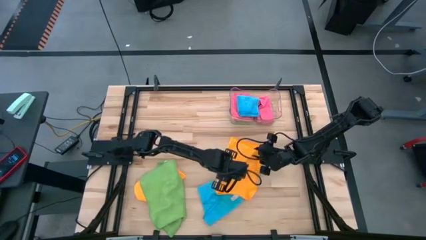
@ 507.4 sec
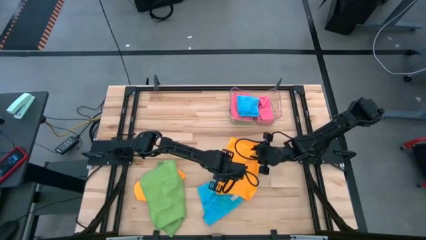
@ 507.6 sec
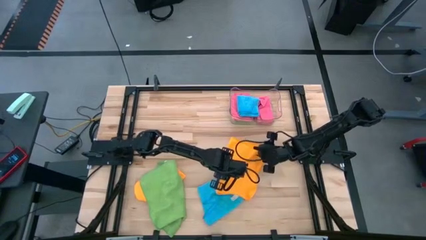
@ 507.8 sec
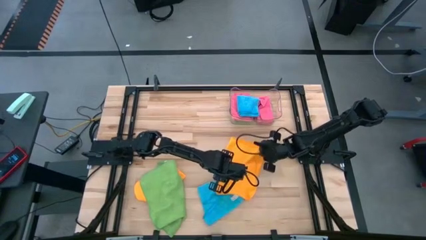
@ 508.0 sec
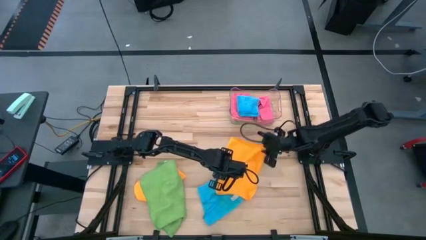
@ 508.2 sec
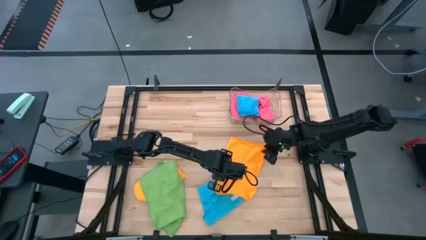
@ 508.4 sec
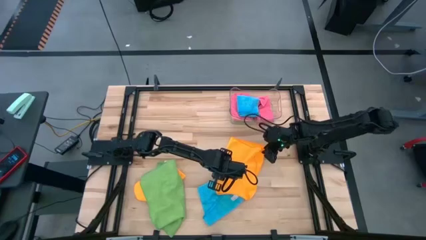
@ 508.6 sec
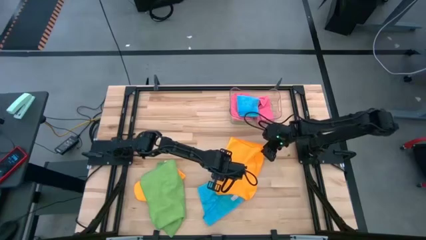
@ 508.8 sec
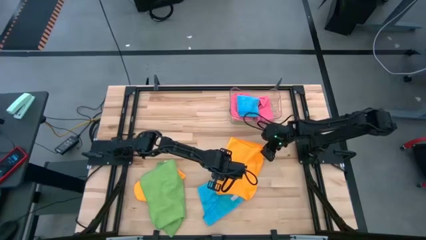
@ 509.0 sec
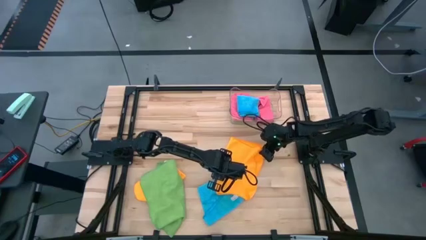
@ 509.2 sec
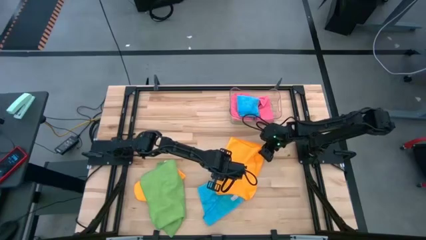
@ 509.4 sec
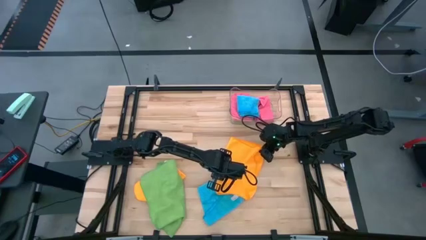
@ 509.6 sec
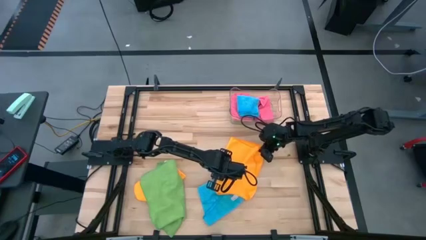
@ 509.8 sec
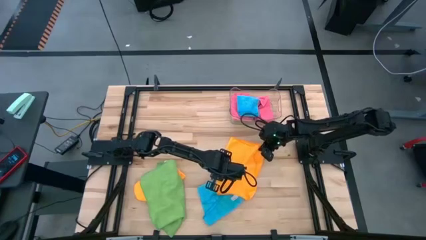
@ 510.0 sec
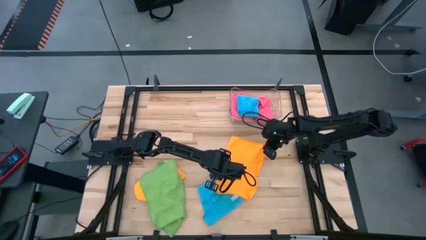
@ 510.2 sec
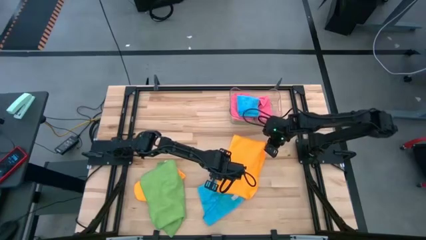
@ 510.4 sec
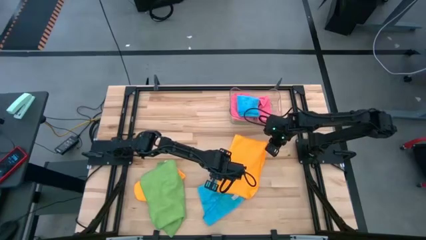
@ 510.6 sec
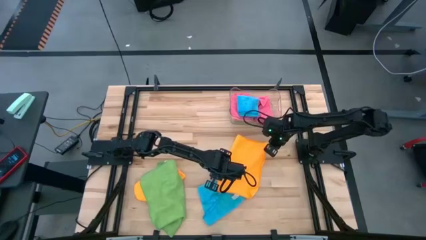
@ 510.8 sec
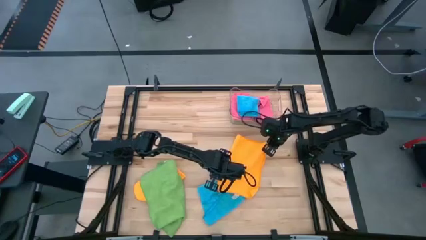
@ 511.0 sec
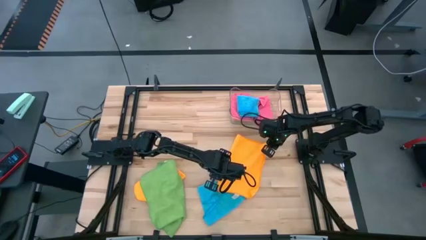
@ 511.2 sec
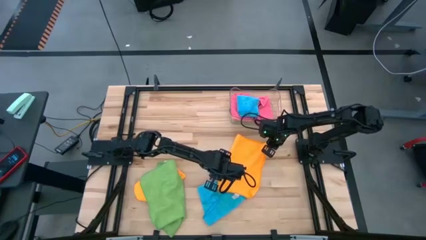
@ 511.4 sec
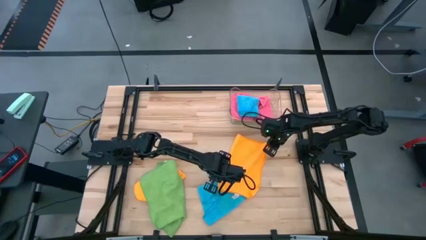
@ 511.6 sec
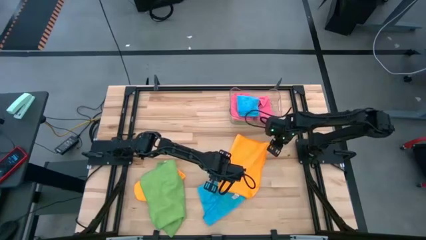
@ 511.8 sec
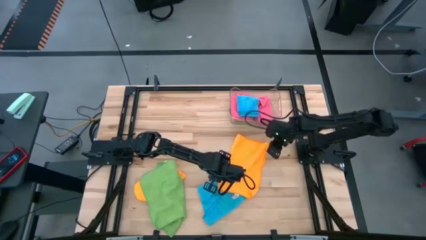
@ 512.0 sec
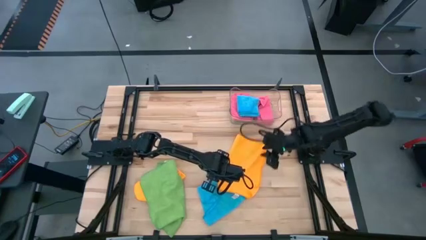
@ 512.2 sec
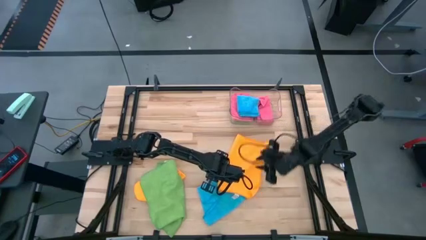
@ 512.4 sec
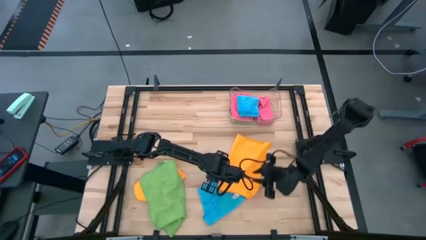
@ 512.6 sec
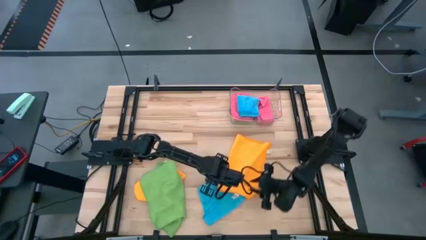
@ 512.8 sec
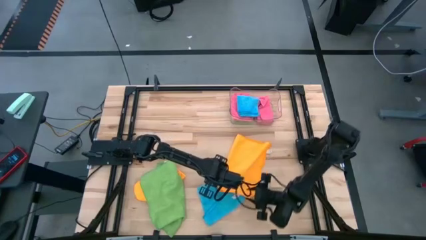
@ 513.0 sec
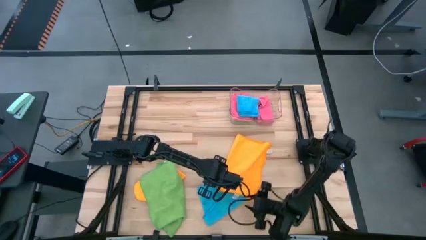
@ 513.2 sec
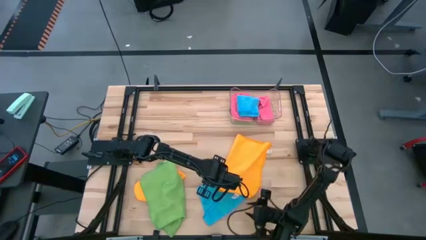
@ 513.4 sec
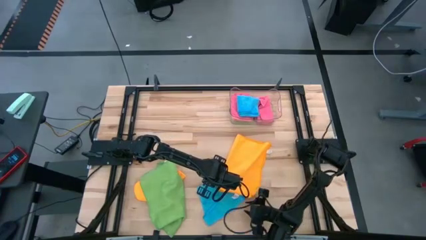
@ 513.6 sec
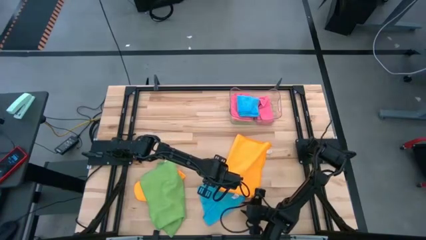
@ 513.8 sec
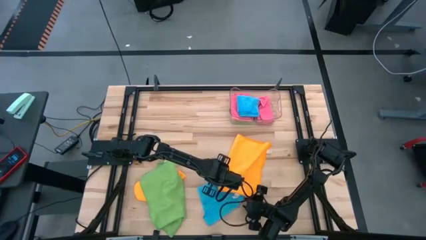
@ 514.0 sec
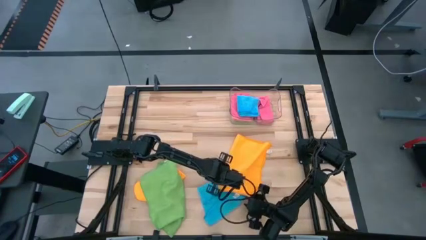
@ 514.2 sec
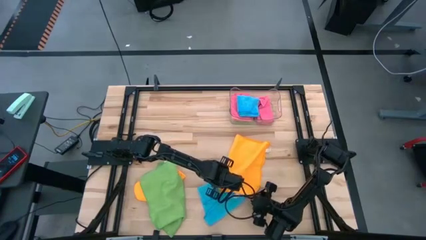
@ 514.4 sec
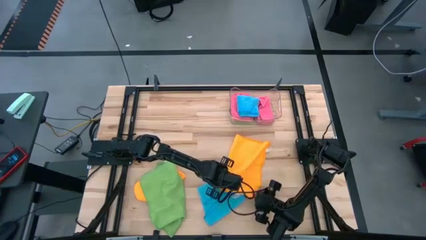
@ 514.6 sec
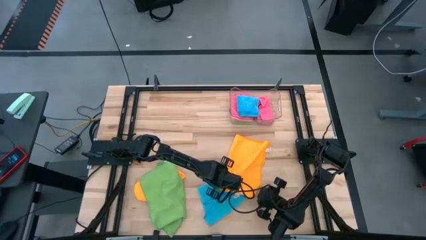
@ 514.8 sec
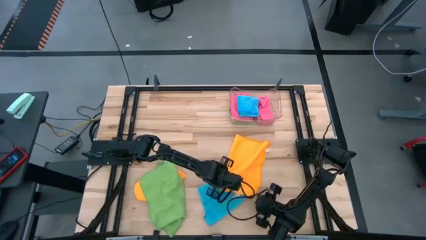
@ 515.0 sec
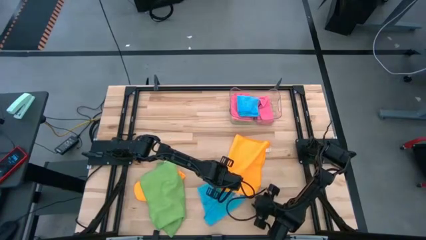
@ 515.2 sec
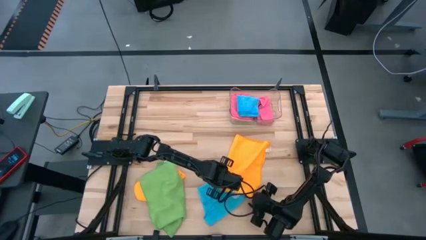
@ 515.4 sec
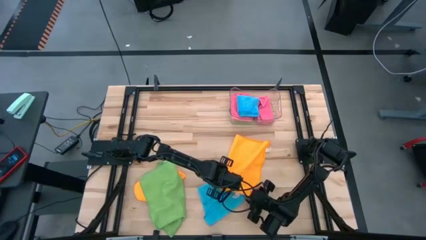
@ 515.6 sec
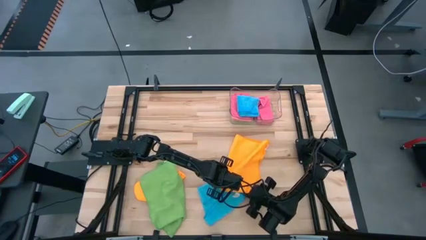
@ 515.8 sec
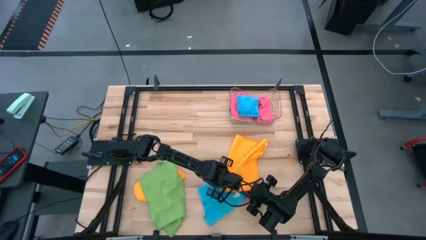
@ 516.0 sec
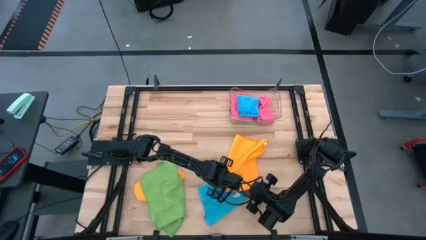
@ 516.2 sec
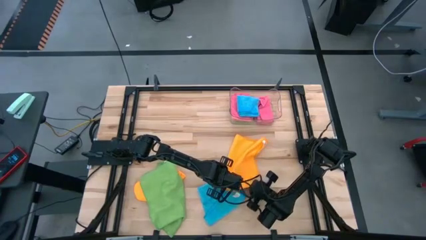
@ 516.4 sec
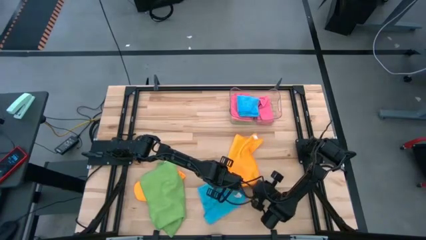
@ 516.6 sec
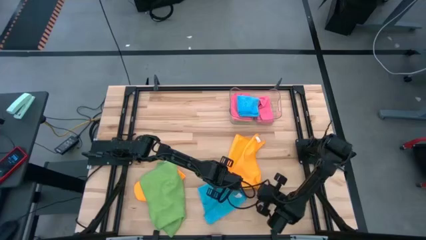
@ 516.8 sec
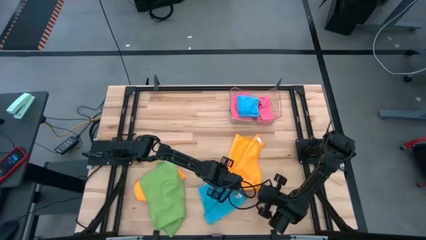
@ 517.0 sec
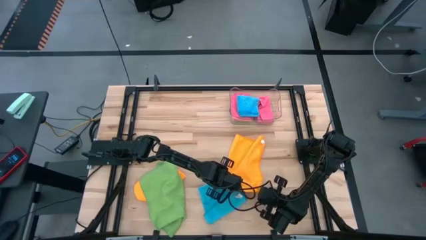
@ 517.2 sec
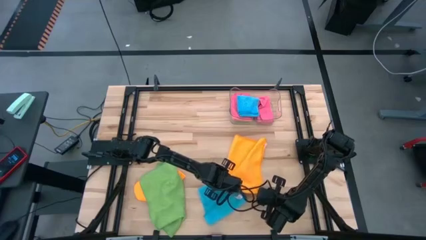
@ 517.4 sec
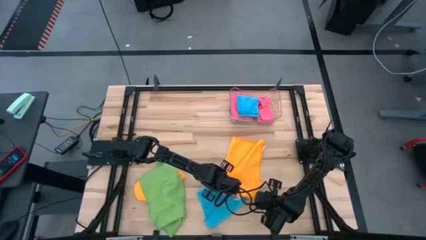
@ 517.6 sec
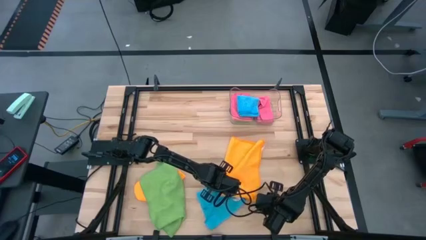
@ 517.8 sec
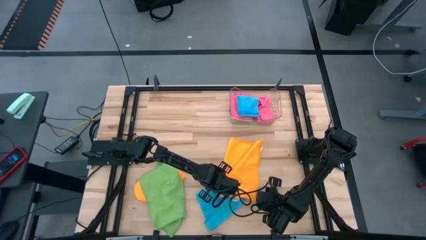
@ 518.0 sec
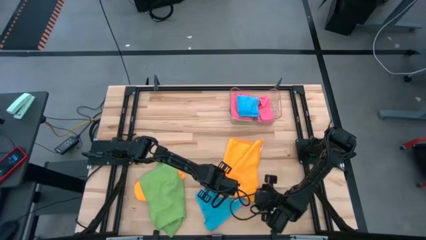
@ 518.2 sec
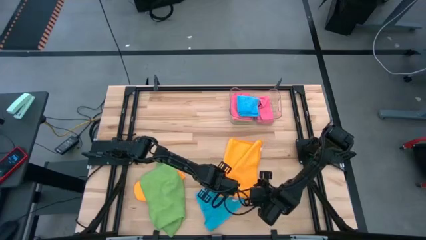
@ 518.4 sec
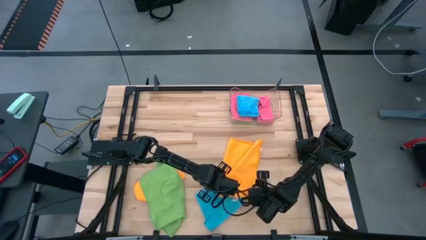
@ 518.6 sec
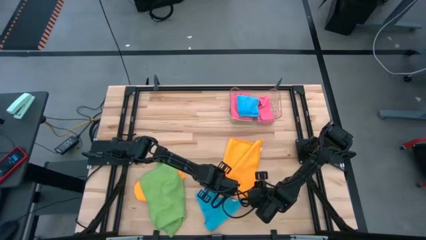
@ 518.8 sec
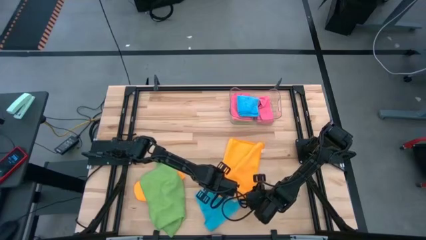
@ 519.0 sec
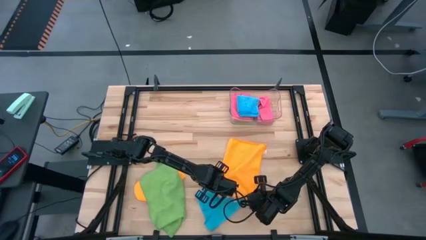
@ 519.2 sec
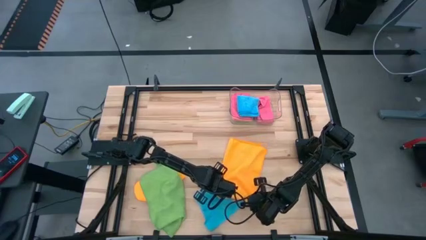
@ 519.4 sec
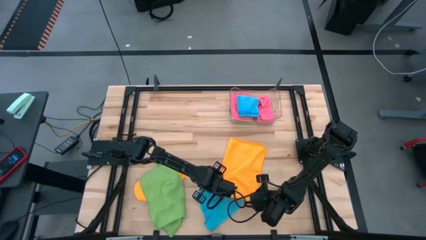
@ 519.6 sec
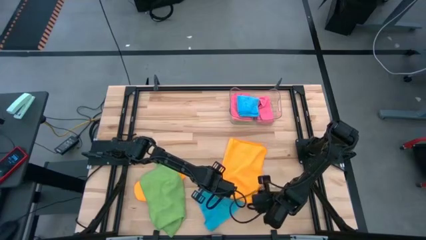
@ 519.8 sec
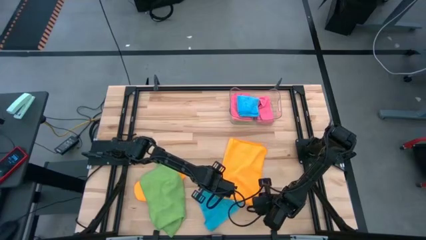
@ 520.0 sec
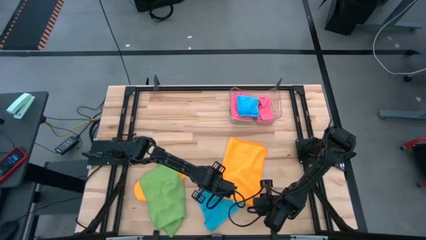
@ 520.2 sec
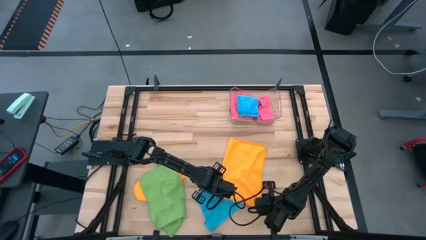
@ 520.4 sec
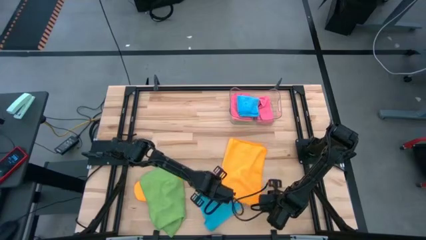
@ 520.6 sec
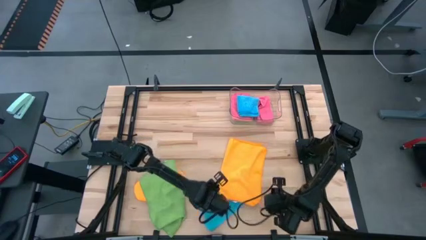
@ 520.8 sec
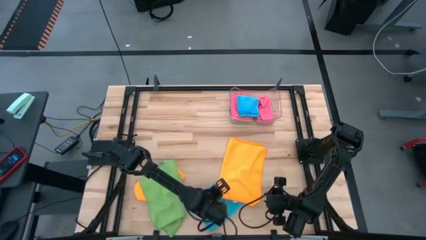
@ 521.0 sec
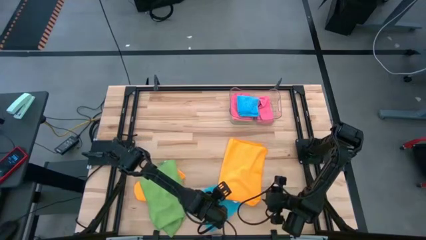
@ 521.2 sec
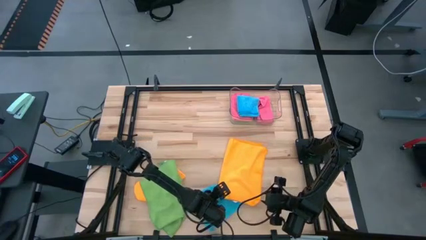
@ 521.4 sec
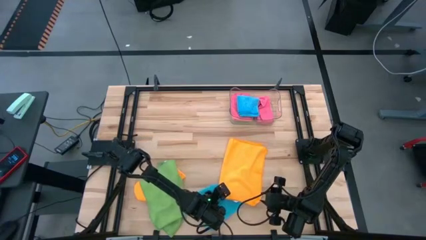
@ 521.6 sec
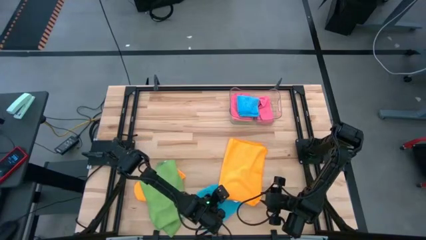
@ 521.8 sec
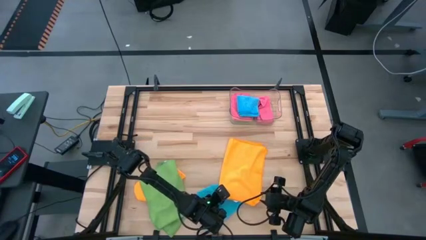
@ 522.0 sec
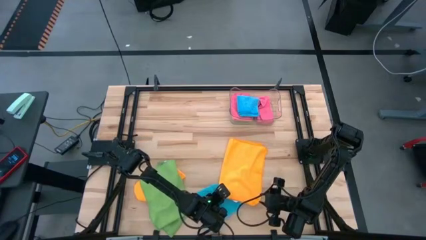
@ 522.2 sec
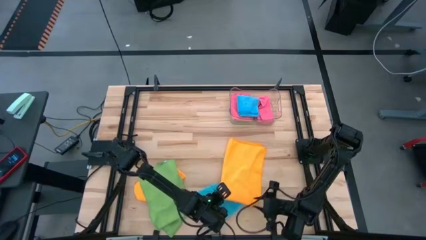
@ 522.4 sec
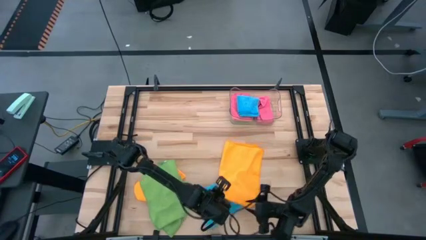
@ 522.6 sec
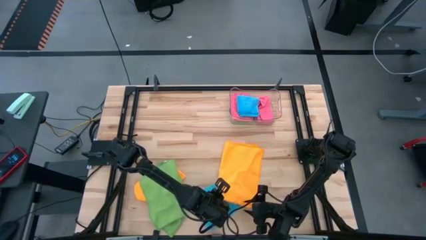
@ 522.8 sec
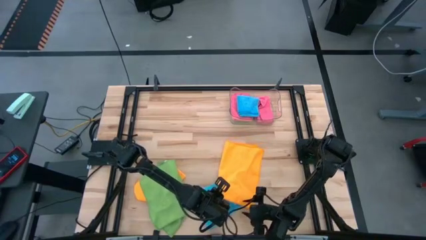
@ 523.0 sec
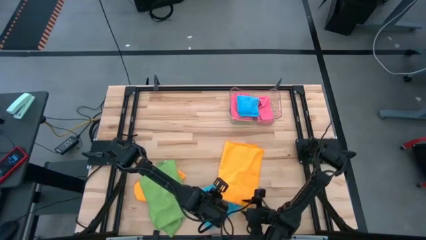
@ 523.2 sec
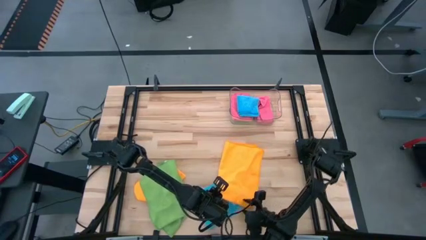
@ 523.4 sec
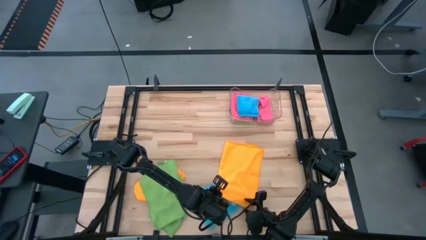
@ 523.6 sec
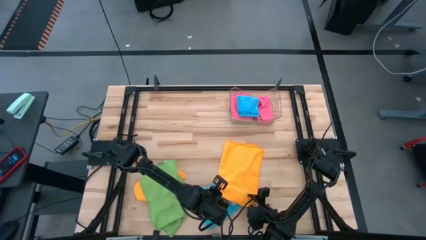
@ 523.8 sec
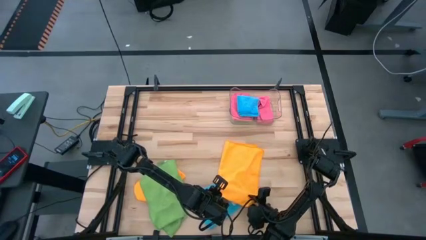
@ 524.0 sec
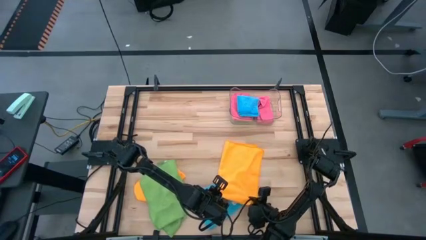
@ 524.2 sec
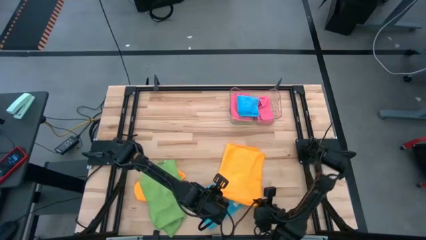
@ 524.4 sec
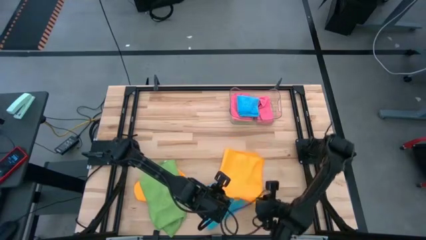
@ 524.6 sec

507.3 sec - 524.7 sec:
Task: Fold microfiber towels
Fold the right yellow towel
